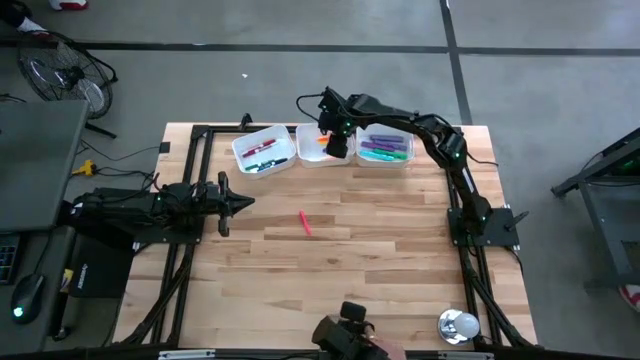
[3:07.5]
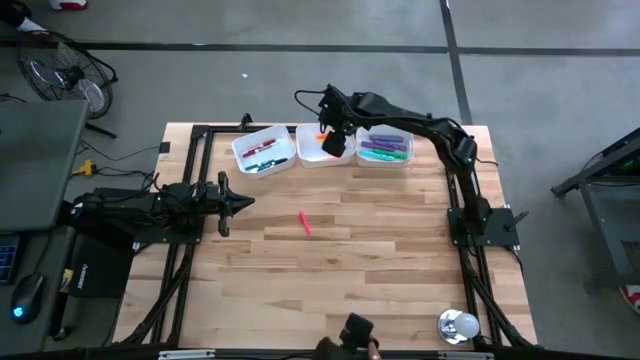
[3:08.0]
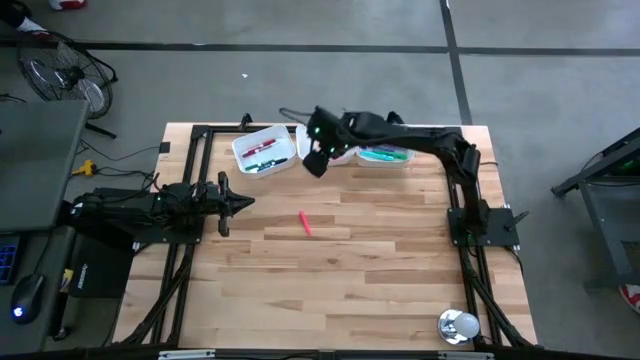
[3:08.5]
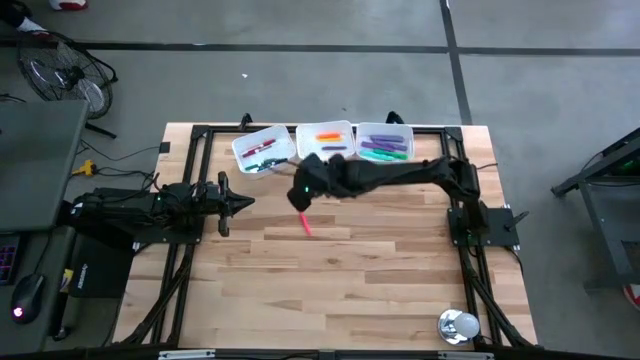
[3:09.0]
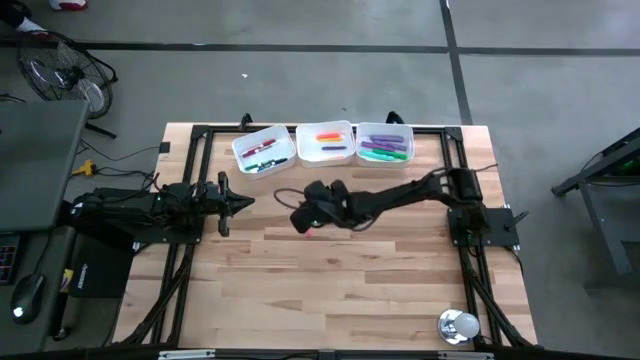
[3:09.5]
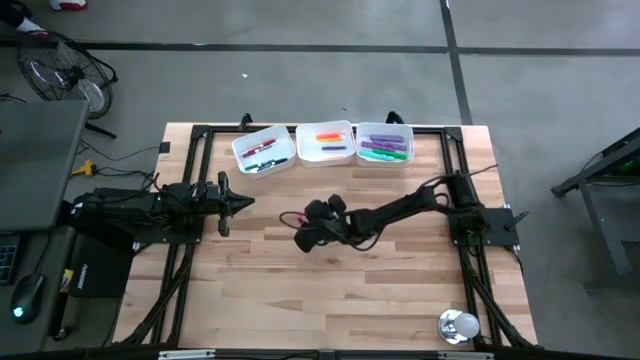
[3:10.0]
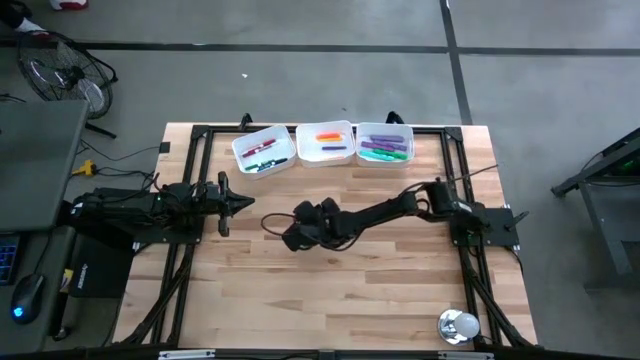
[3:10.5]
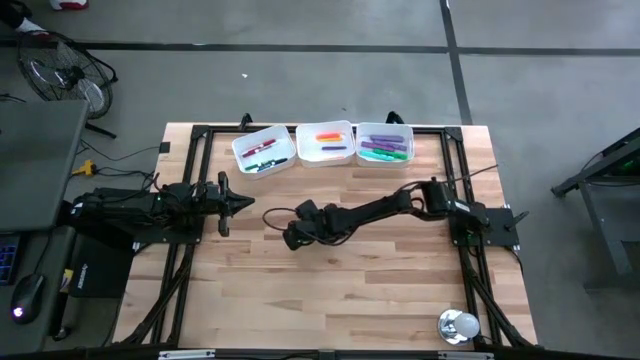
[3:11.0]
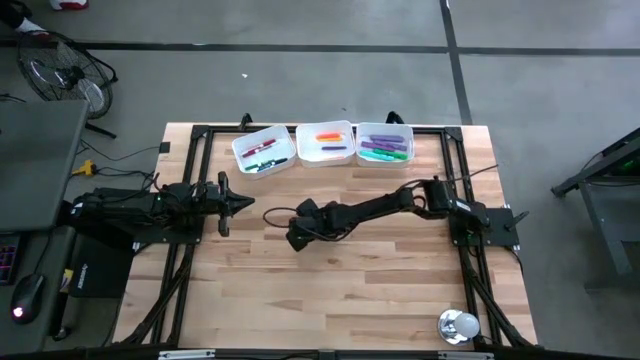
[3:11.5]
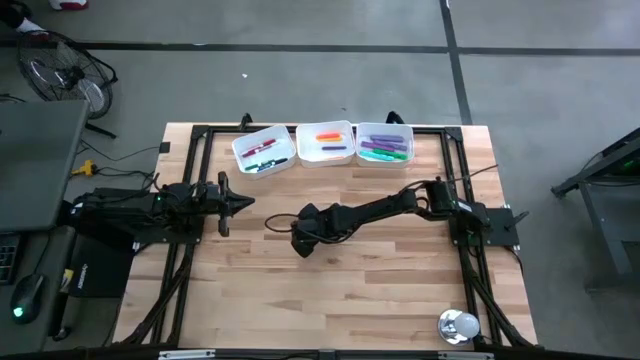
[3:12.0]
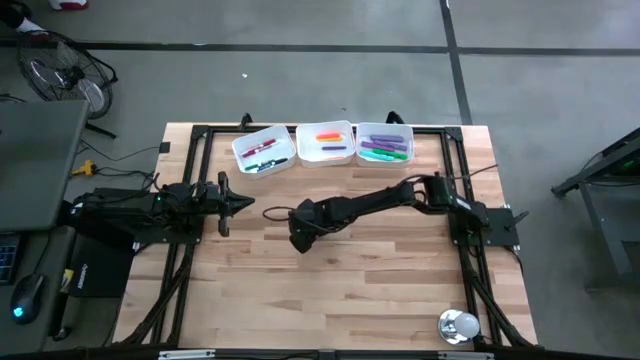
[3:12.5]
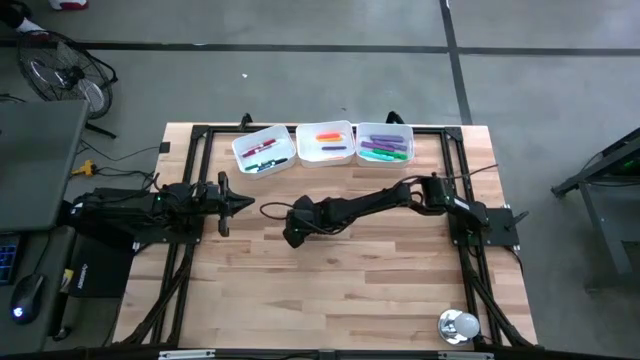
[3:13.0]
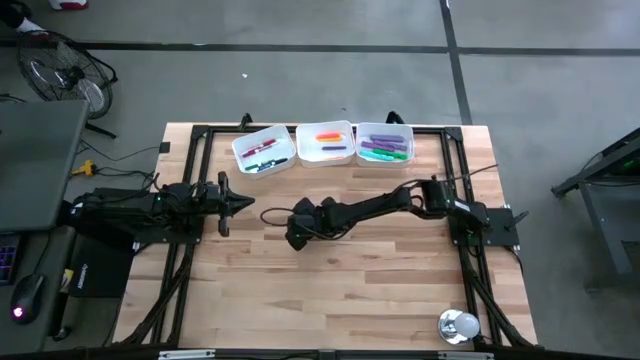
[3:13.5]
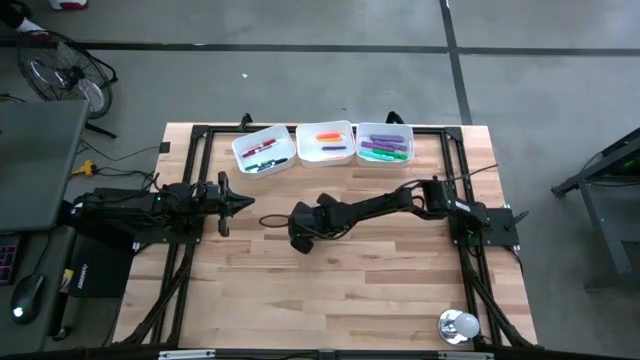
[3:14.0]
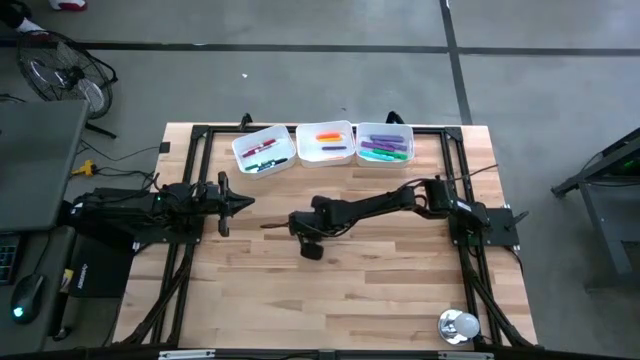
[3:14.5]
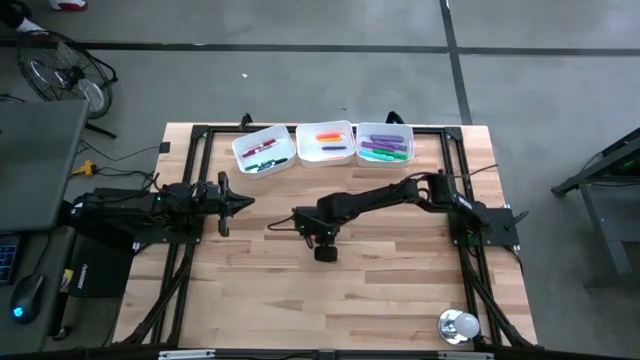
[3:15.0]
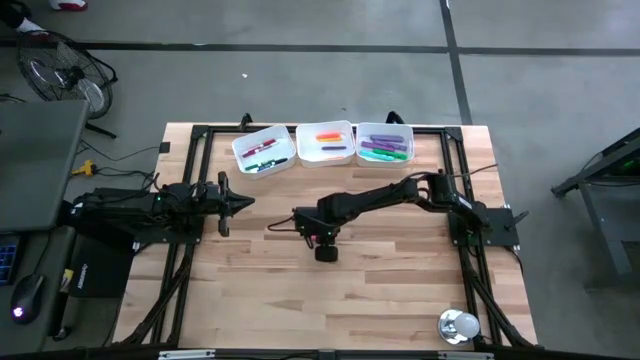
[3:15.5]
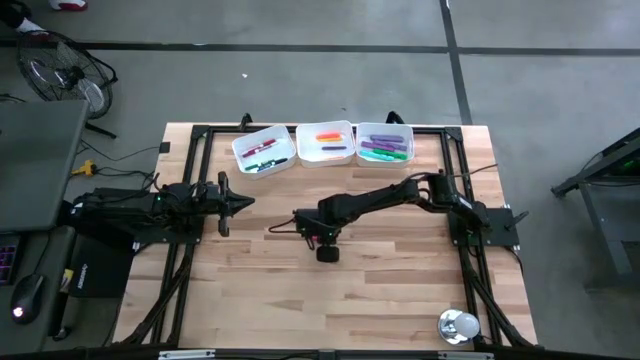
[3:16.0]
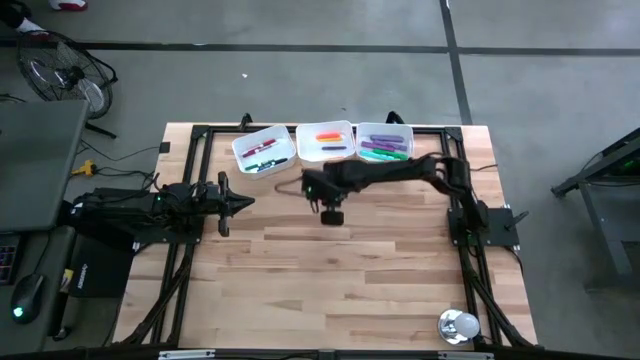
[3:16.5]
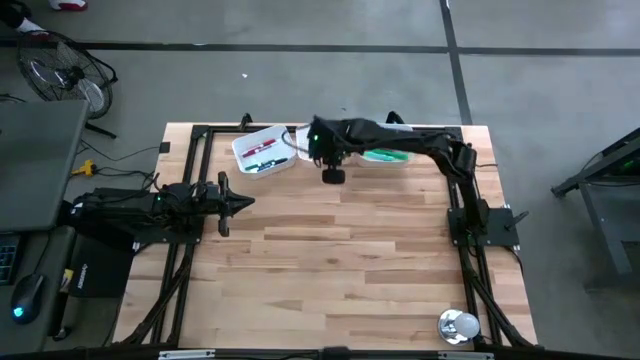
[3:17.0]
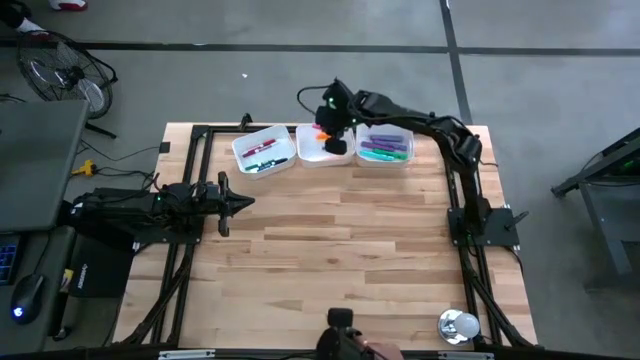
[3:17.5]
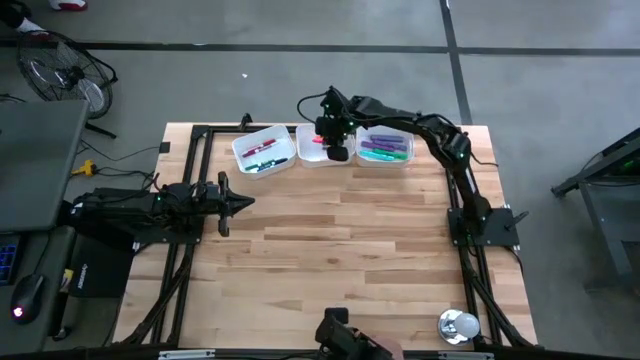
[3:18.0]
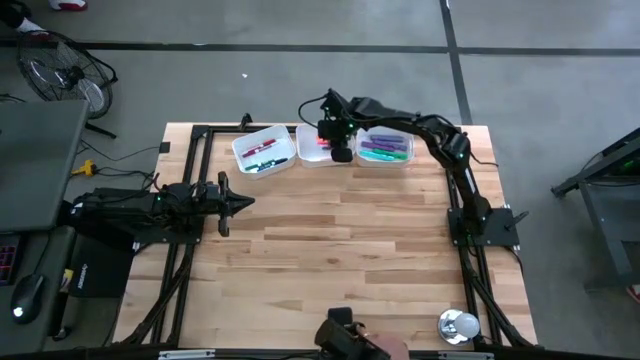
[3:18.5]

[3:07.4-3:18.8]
Task: Pick & Place Markers
Put the pink pen into the middle white bin

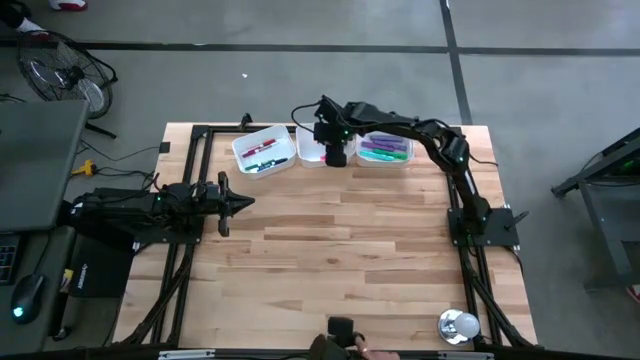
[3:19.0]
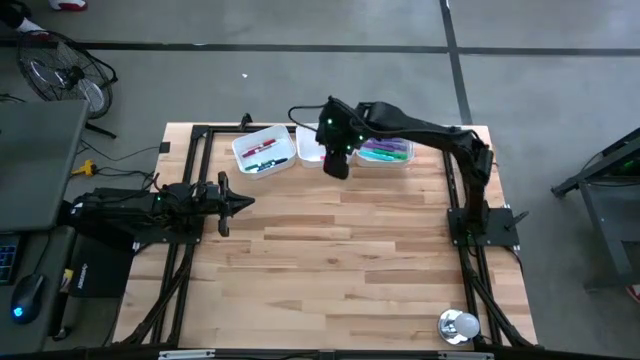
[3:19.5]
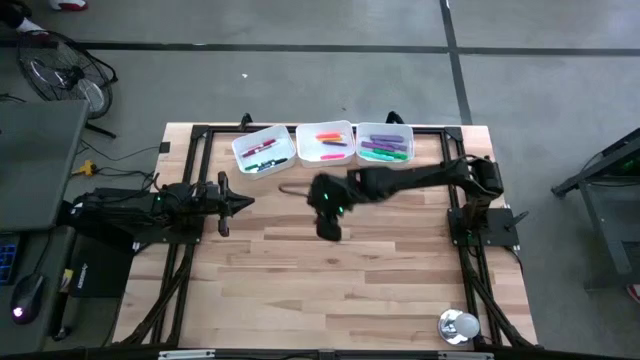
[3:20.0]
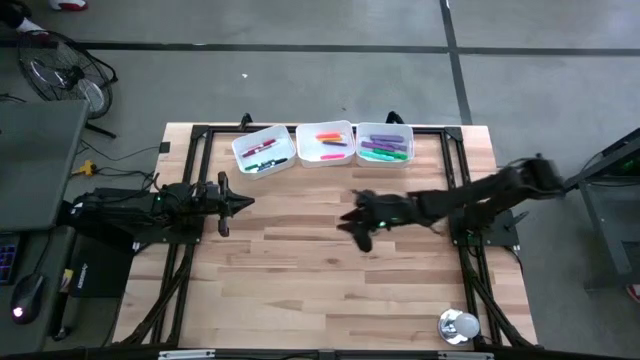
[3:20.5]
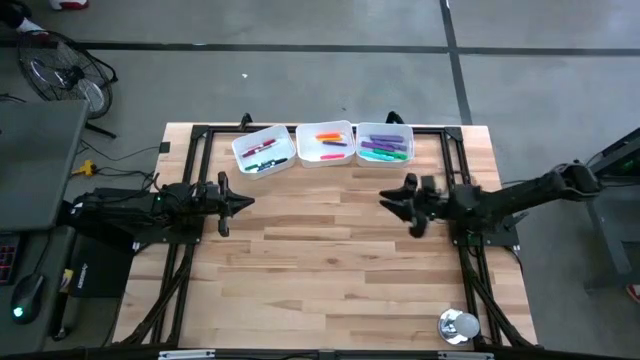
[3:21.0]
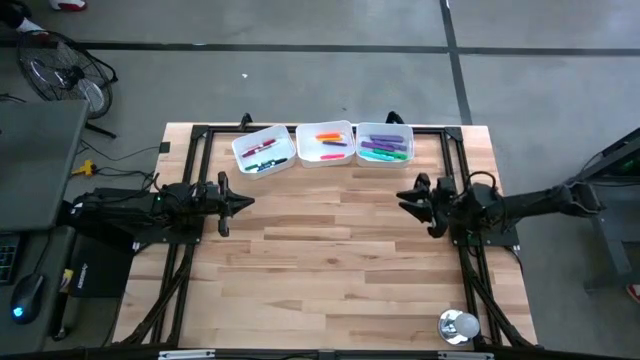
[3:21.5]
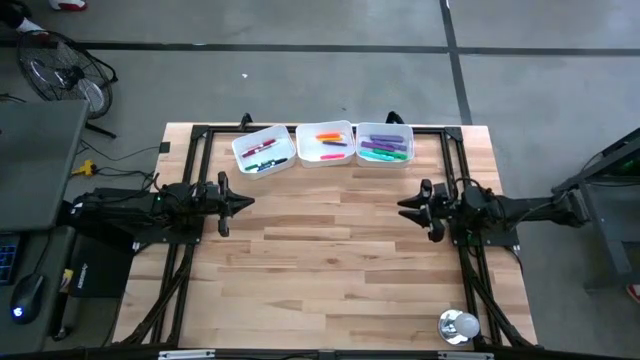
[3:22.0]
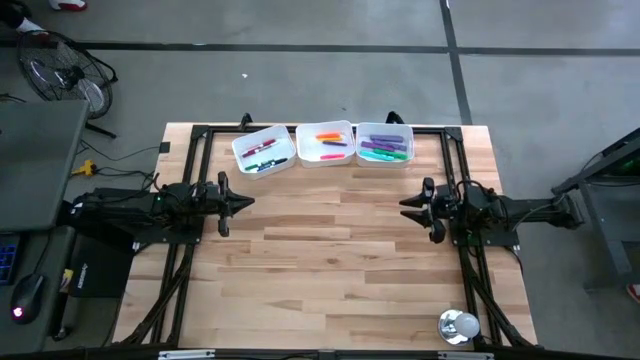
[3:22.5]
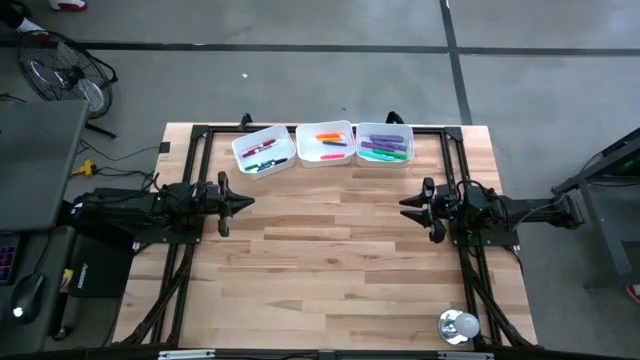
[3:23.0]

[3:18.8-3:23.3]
Return to Home Position

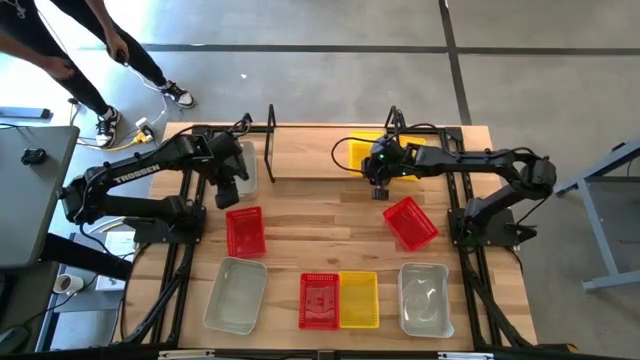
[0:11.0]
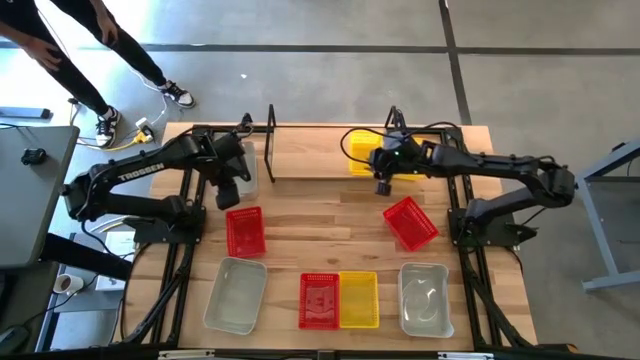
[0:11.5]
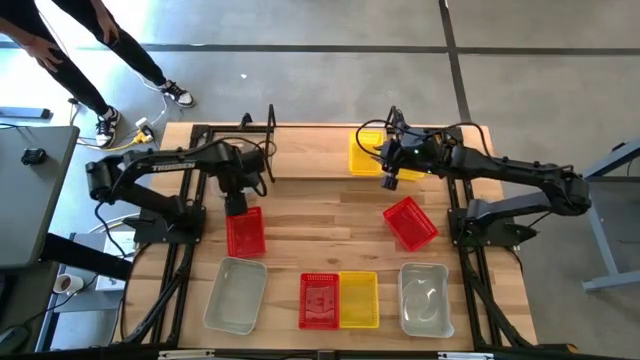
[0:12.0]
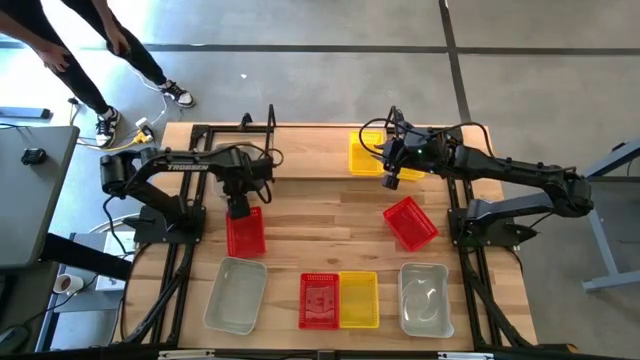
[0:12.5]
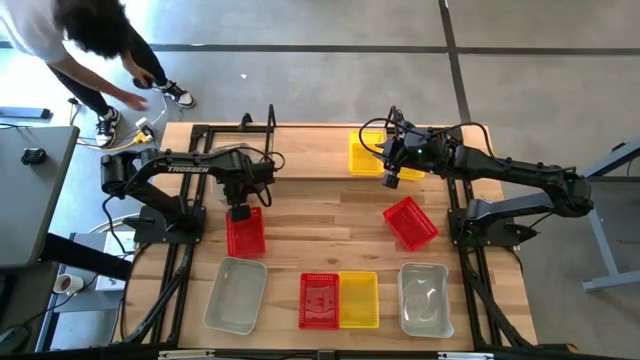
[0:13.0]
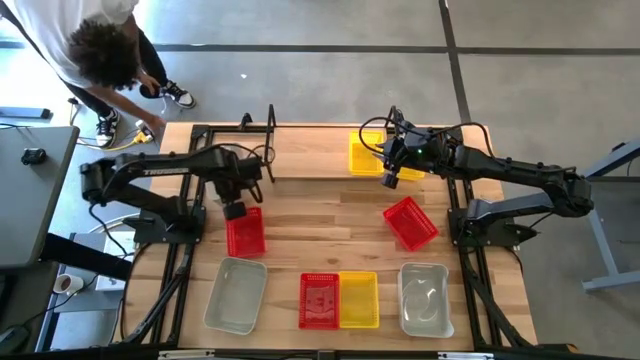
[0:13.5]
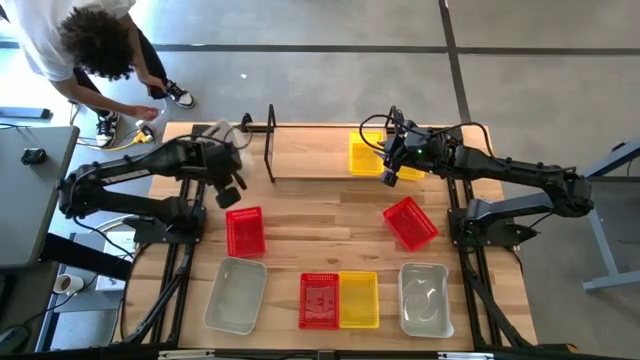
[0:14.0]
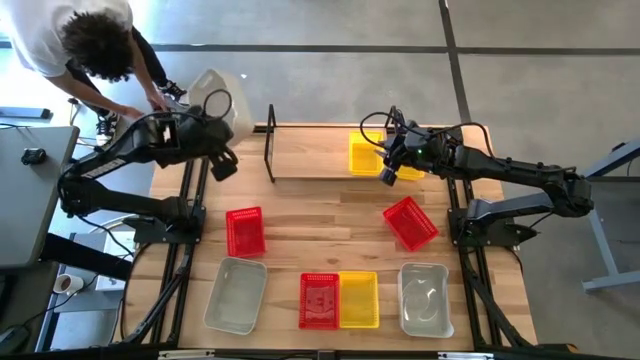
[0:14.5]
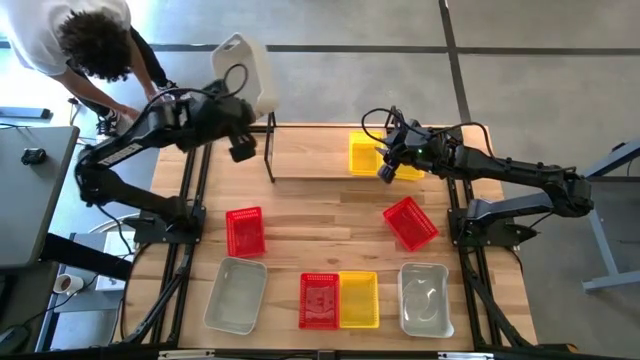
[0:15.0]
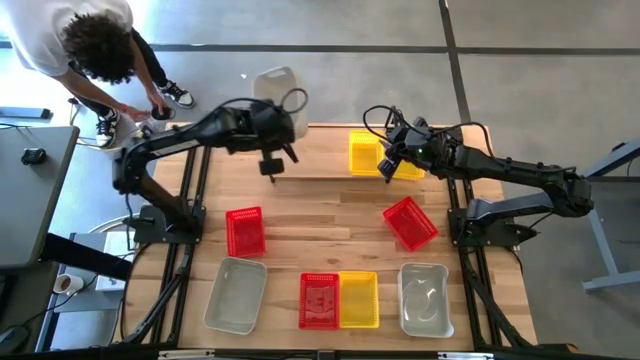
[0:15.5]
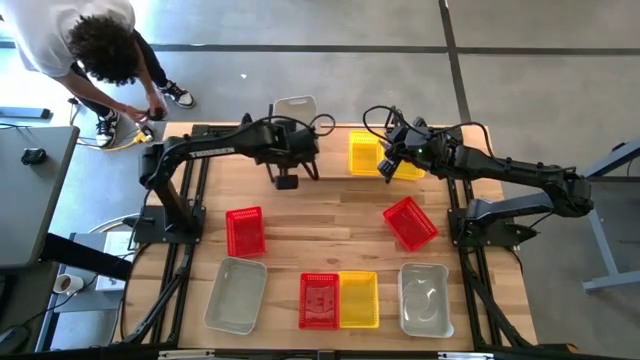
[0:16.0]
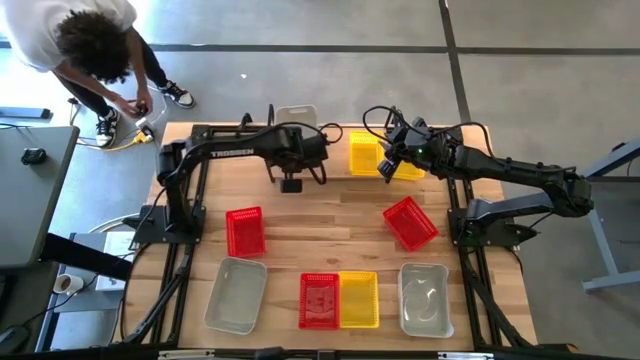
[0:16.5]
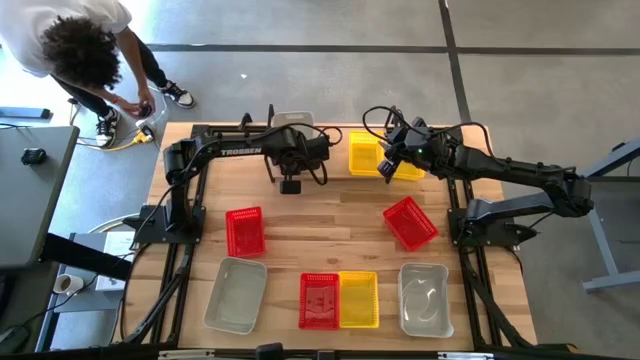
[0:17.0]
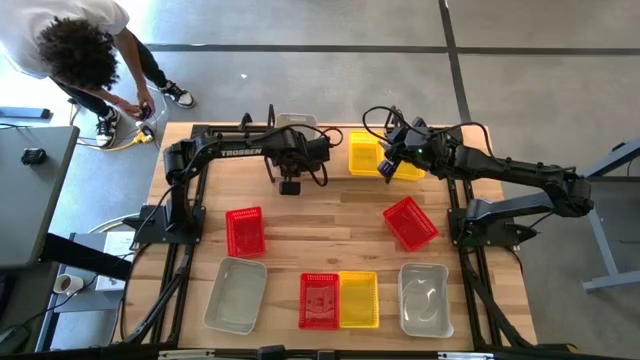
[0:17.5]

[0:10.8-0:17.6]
Task: Stack baskets on shelf by color
Put the top left white bin on the shelf
